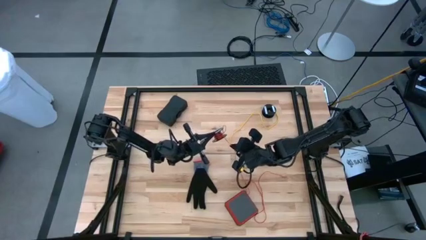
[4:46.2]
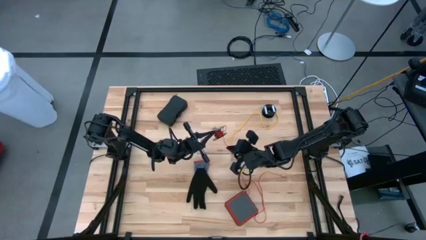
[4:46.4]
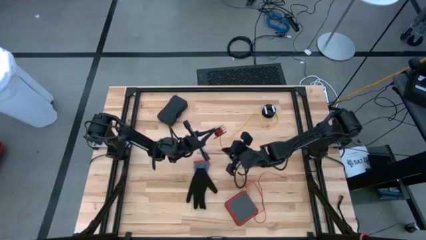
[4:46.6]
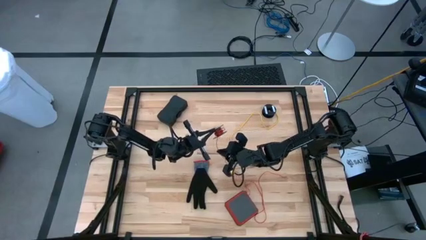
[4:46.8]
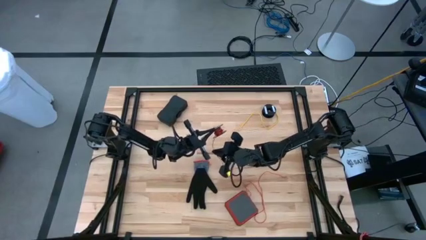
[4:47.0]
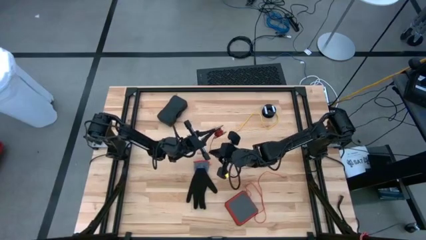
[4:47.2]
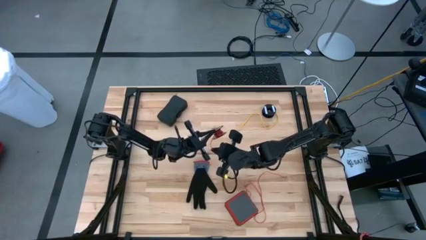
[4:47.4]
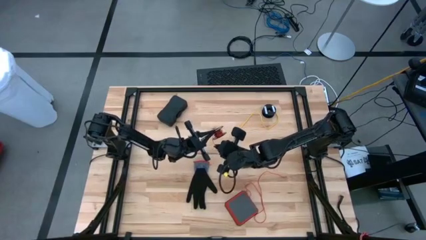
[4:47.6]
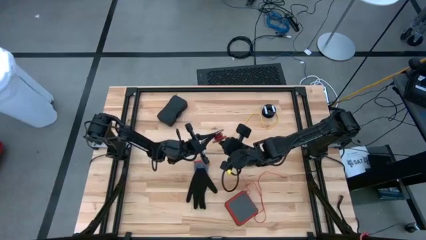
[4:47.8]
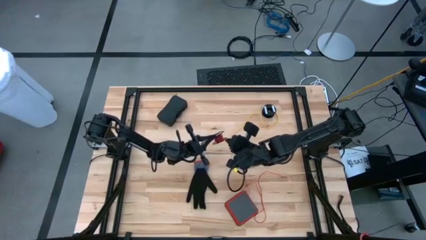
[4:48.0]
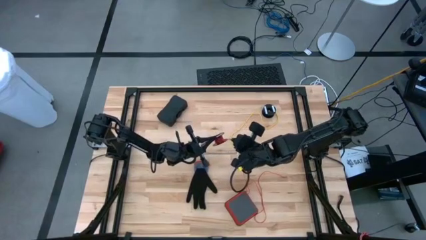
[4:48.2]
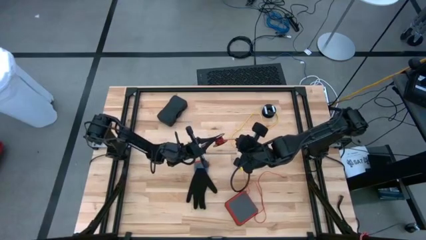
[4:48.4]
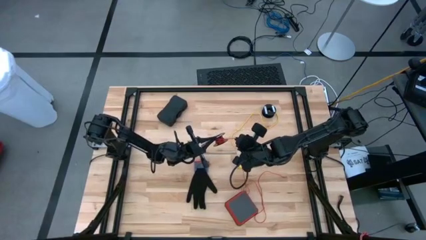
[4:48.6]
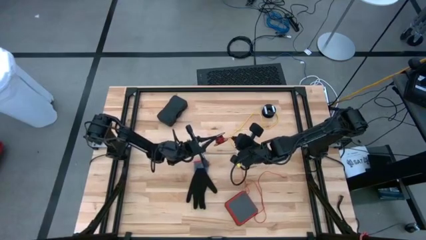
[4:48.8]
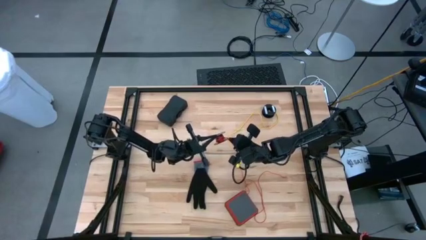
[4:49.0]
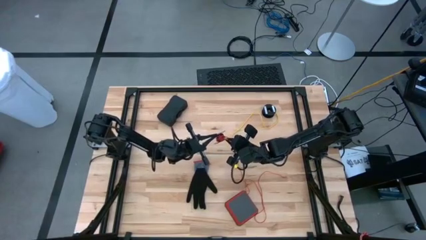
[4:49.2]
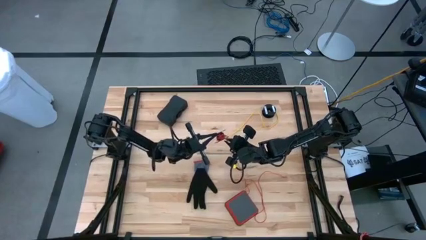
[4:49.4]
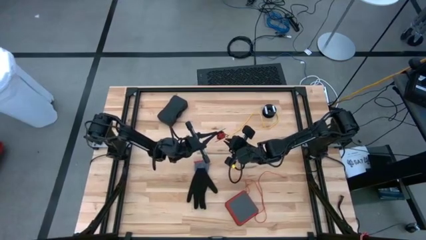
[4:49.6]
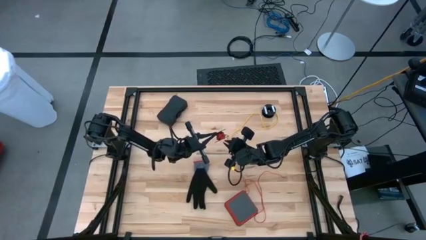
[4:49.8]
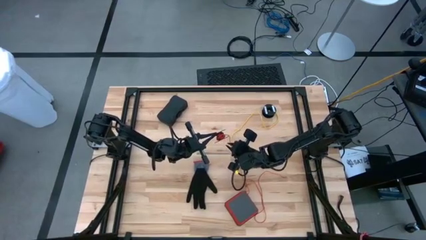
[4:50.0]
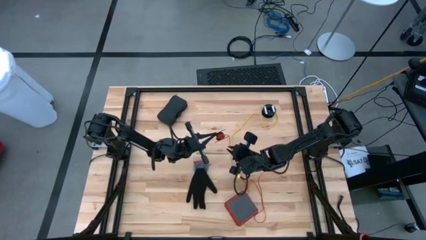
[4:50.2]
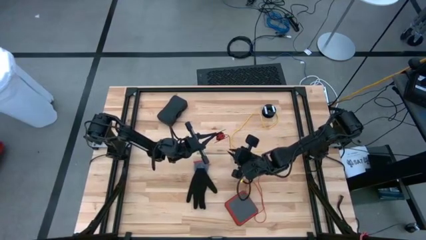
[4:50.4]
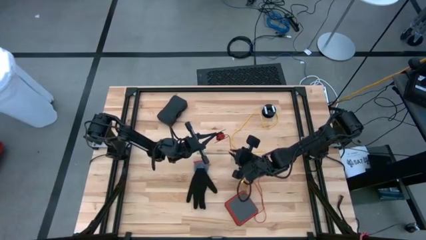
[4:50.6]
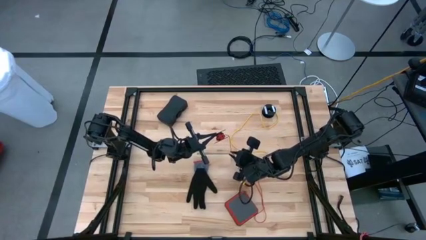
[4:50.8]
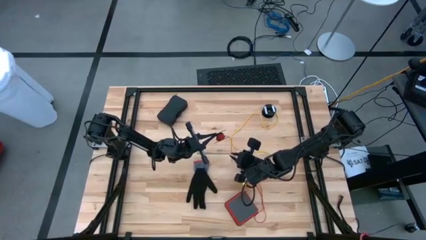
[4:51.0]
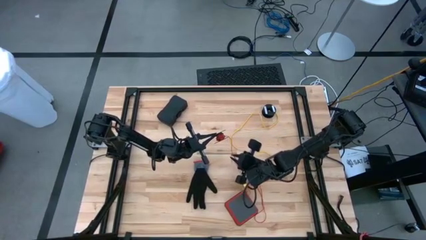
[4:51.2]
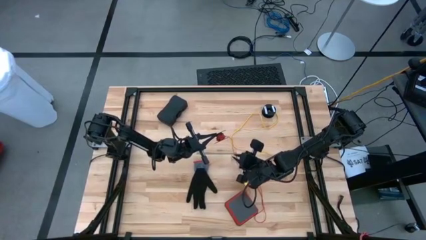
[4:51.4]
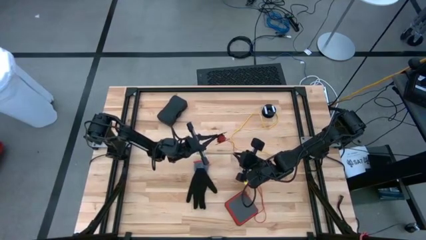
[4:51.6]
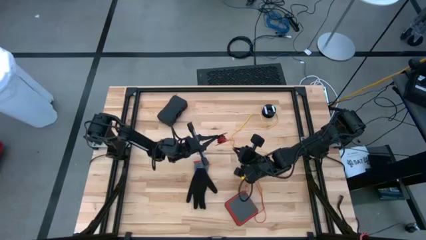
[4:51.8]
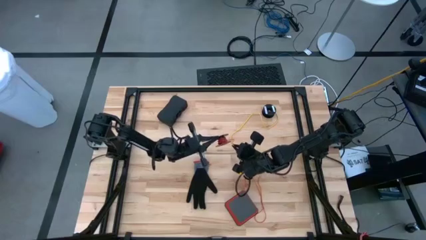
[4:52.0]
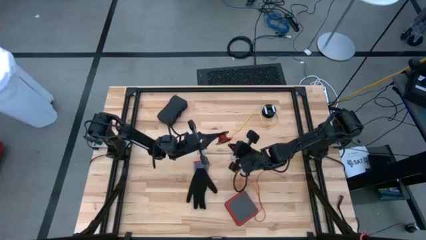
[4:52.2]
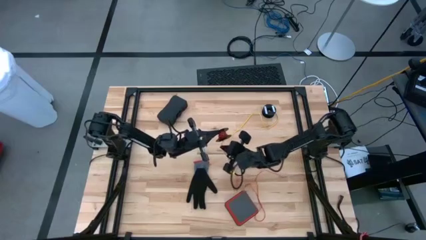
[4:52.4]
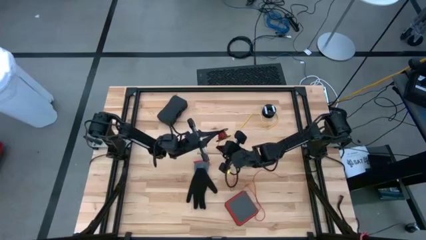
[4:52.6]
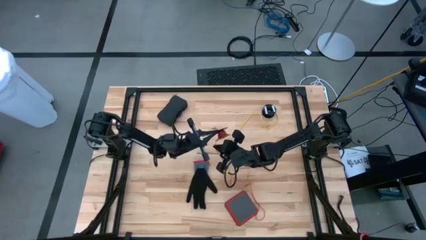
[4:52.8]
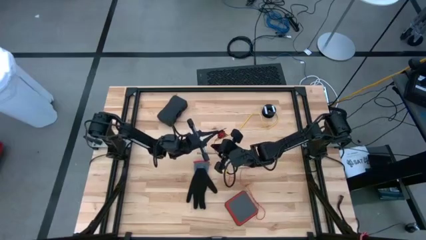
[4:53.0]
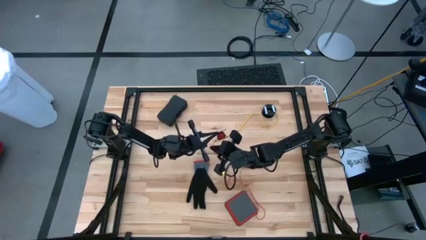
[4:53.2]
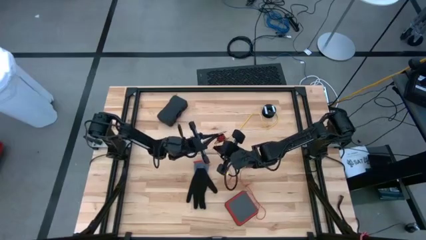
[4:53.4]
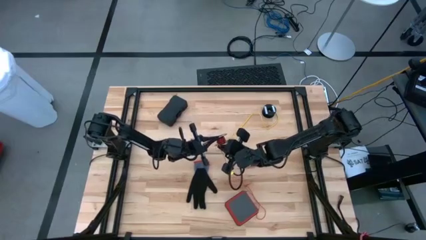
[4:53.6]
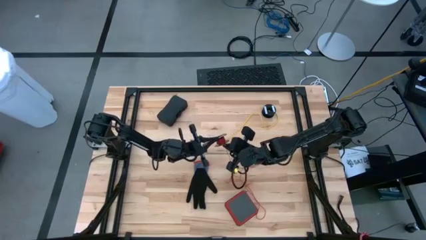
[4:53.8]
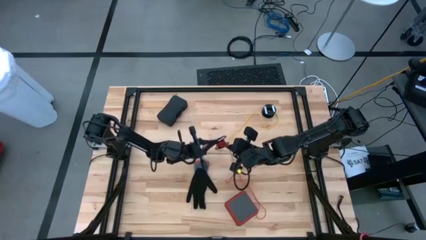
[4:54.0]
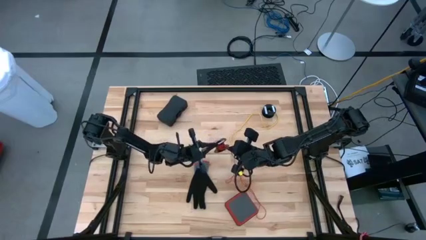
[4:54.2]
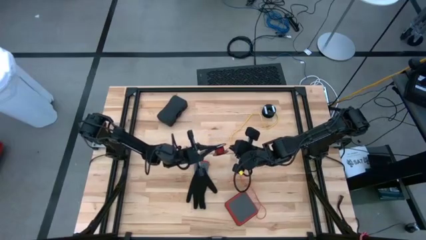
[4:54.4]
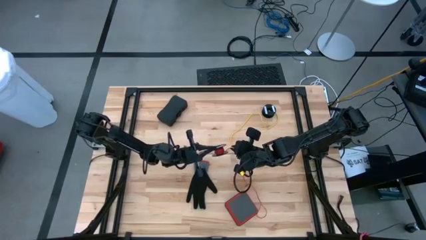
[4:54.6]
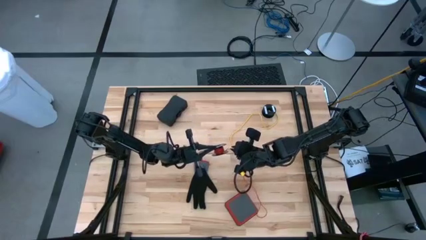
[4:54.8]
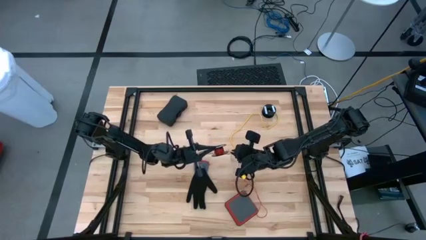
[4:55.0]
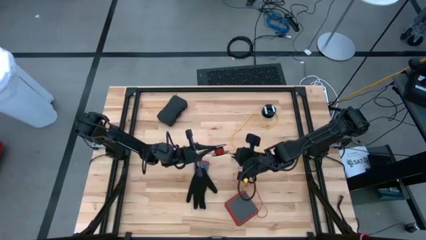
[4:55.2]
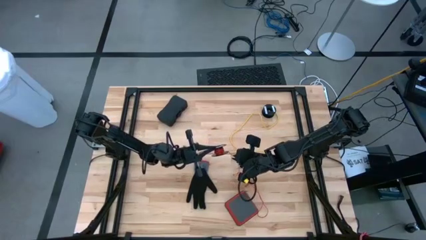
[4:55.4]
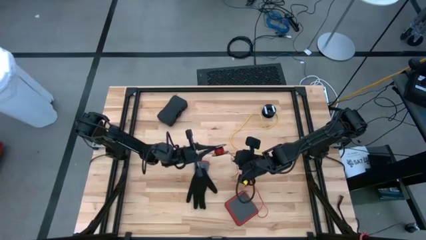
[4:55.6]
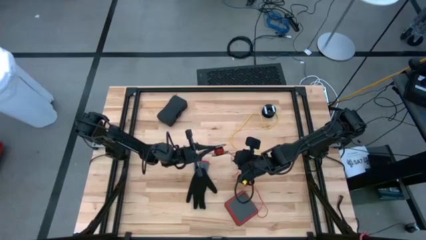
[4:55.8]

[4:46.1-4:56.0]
Task: Coil cords
Coil the red wire onto the black spool

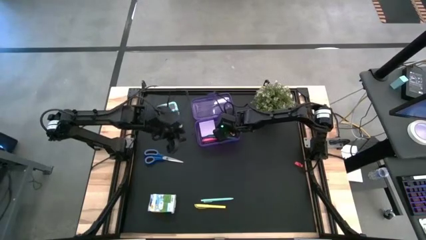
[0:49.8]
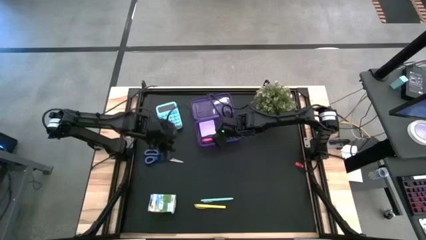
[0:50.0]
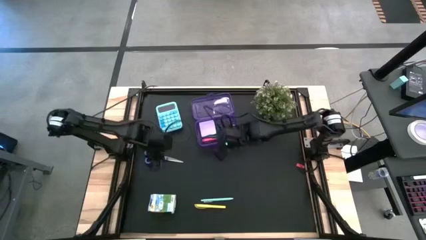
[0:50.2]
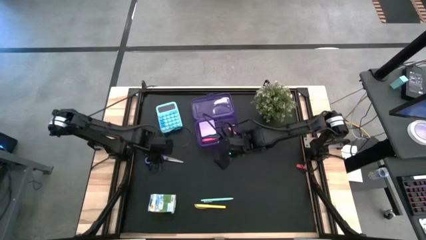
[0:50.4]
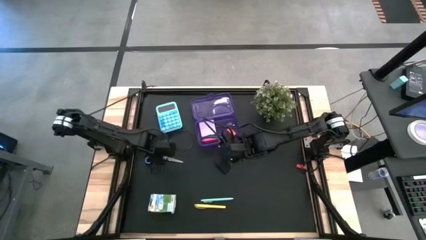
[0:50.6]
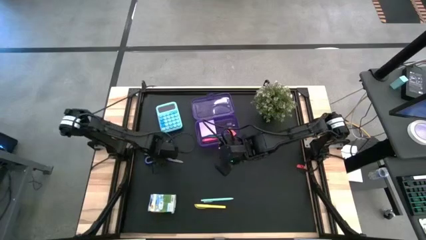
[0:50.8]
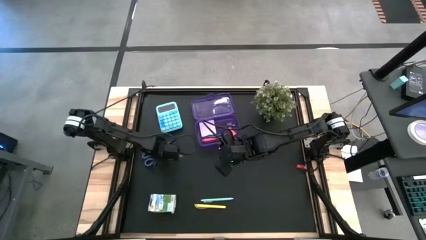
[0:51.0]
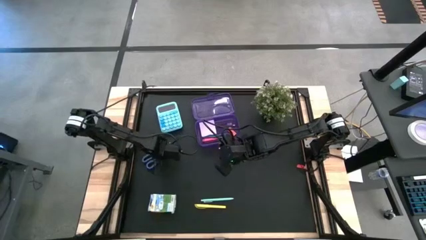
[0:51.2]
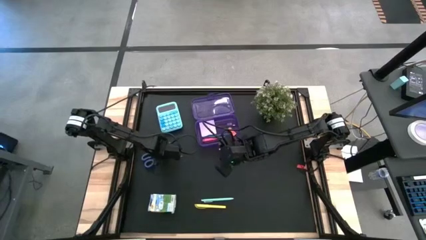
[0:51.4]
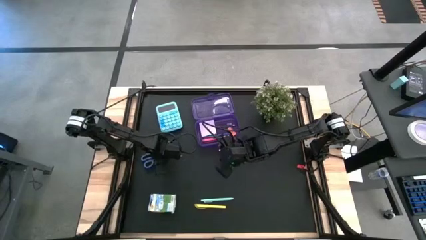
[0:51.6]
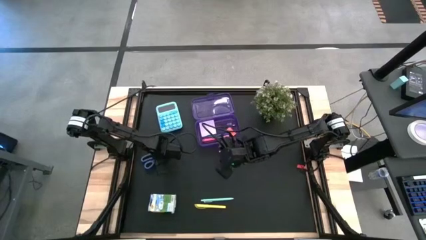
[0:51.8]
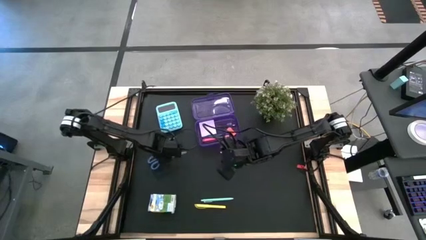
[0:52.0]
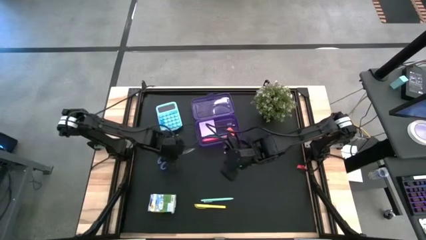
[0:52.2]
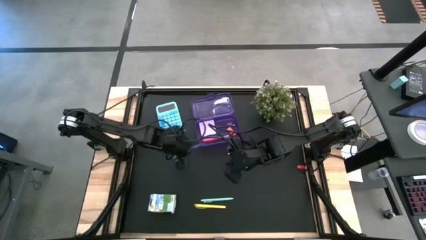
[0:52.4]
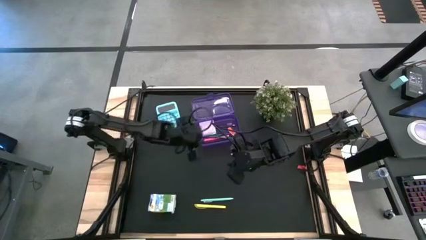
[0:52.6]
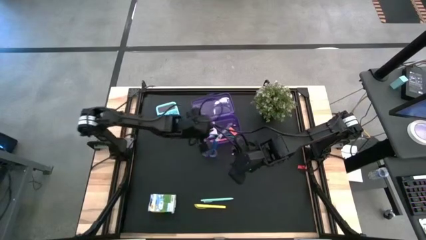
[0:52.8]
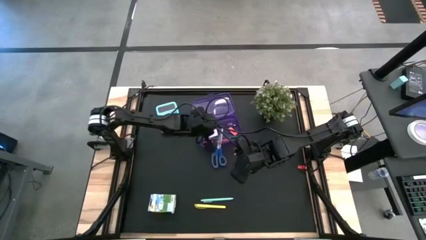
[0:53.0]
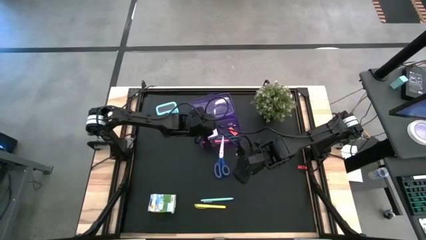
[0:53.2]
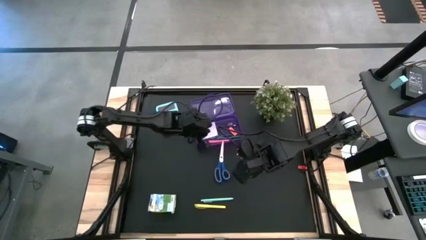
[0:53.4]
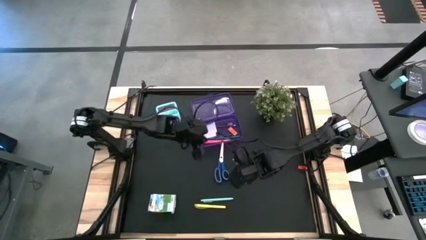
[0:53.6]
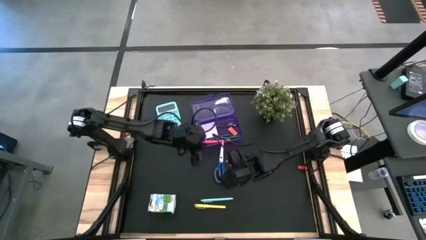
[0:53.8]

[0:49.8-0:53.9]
Task: Pack school essentials
Put the blue scissors into the purple supply box

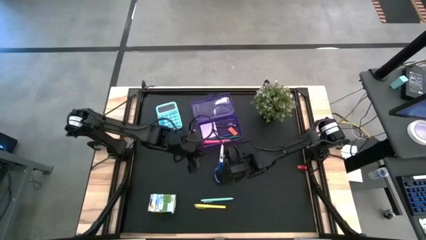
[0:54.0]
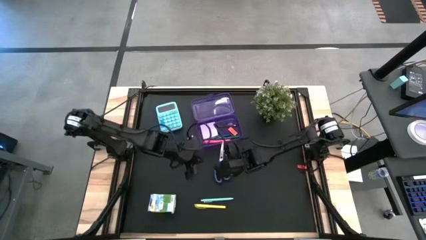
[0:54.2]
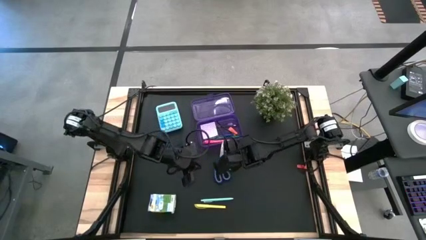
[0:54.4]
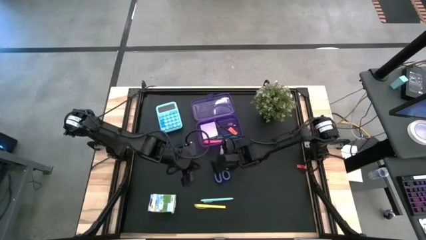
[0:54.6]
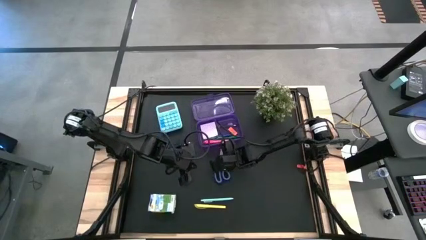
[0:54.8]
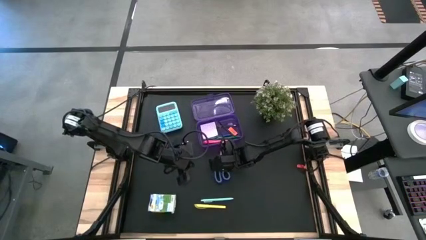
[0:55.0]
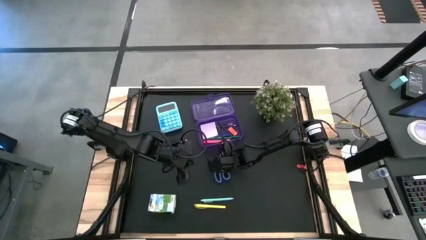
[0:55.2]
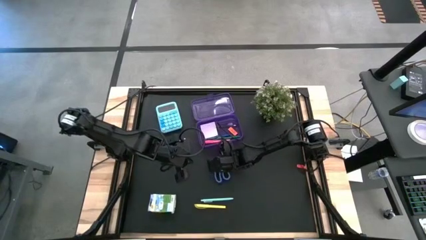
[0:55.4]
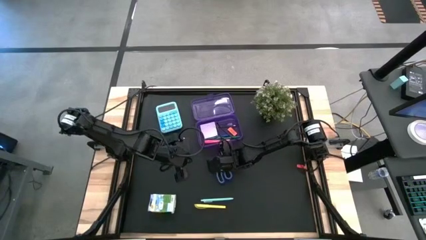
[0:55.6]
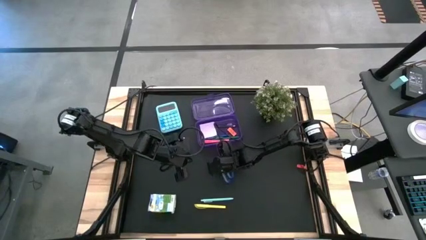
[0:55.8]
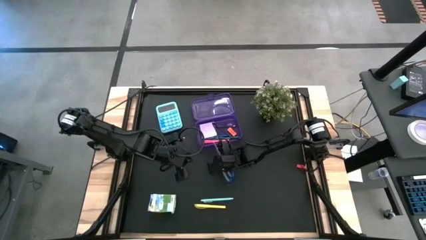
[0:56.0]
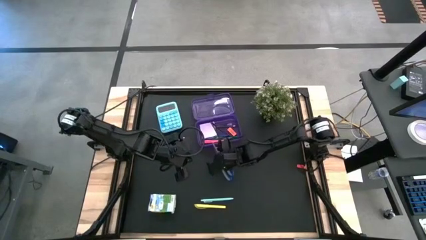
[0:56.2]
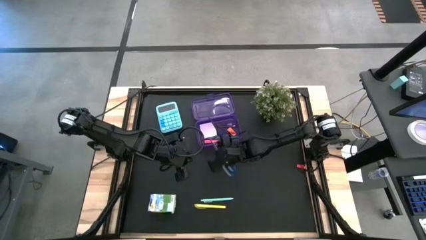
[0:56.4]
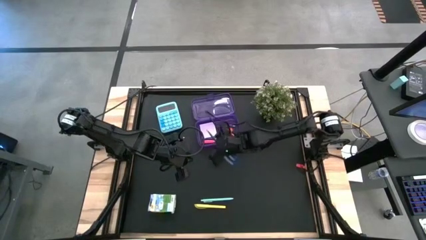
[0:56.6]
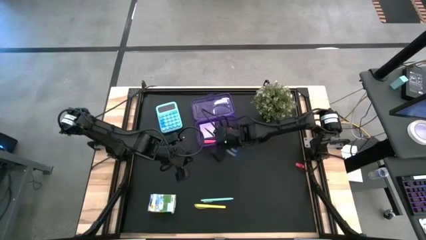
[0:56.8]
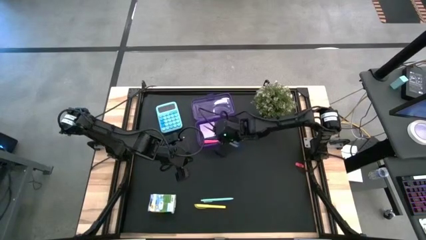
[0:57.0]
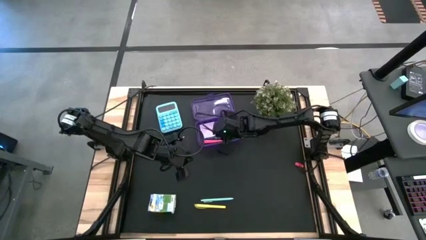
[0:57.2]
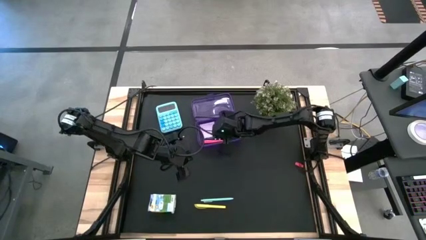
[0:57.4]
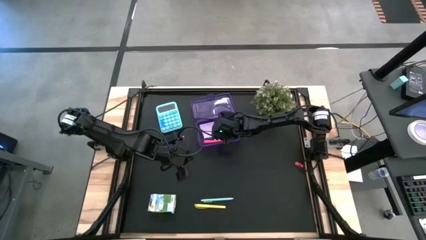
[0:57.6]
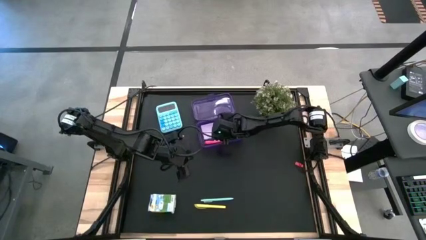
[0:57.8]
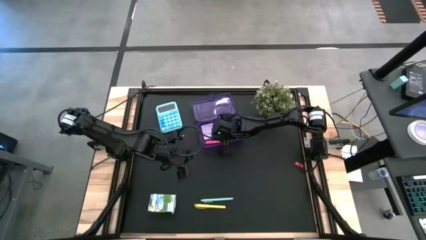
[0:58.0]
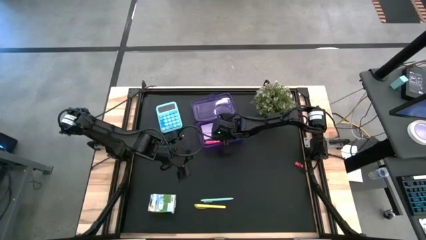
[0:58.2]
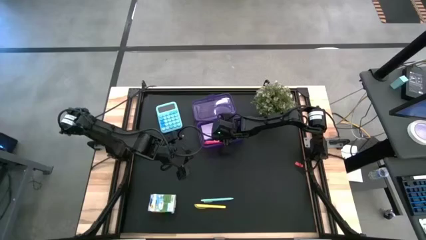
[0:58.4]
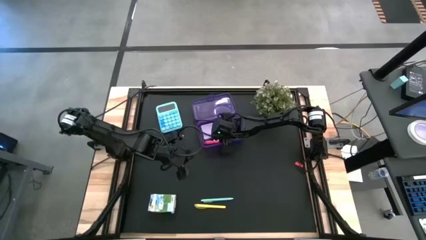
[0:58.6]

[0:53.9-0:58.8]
Put the blue scissors into the purple supply box
